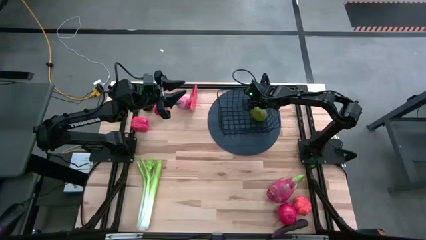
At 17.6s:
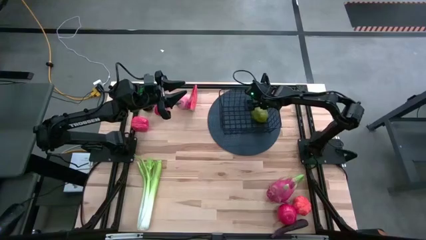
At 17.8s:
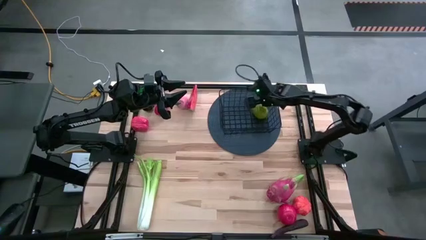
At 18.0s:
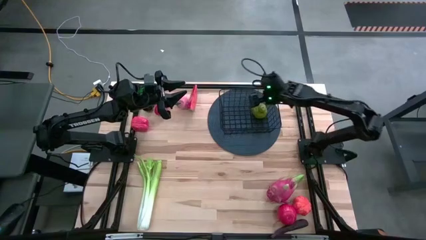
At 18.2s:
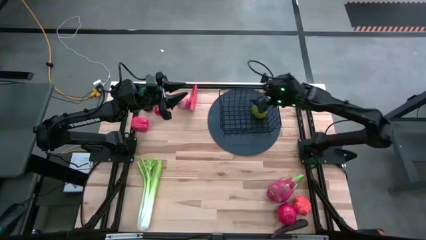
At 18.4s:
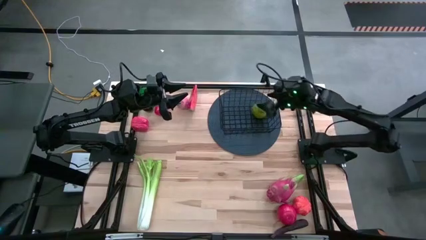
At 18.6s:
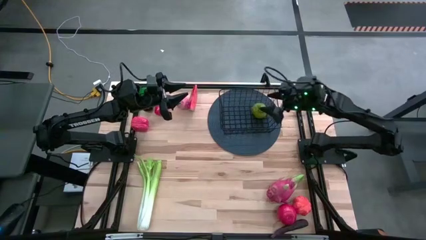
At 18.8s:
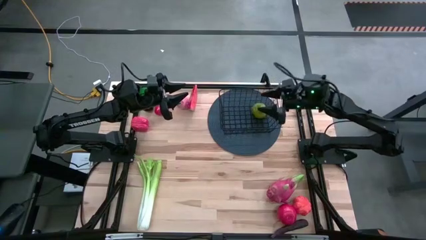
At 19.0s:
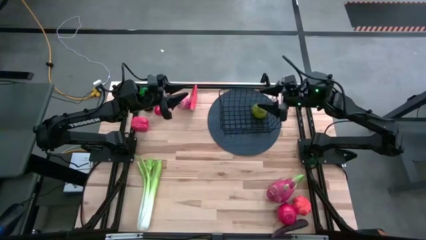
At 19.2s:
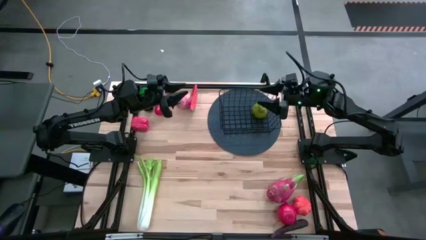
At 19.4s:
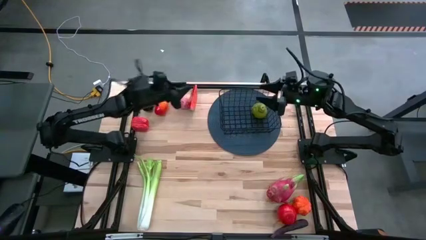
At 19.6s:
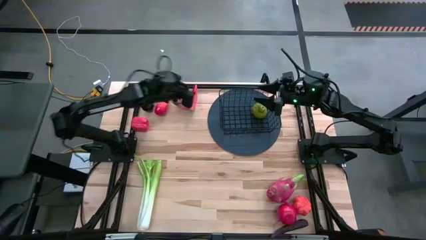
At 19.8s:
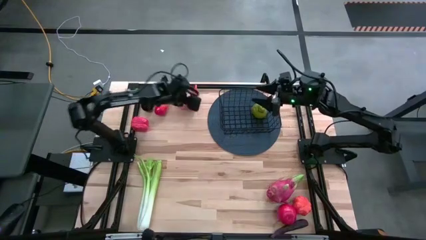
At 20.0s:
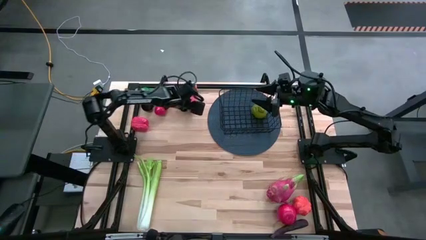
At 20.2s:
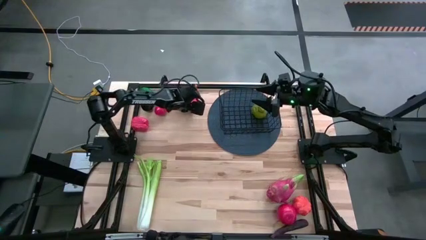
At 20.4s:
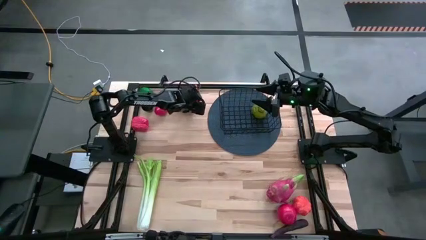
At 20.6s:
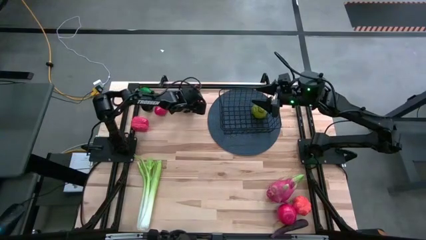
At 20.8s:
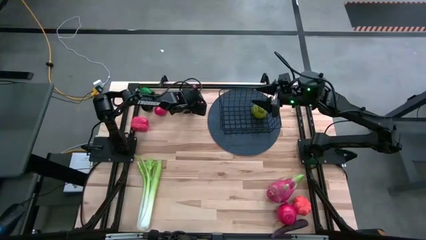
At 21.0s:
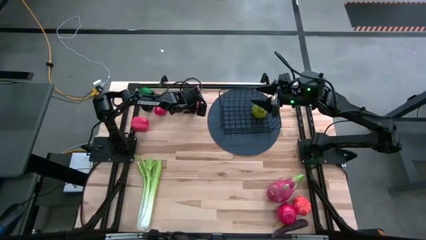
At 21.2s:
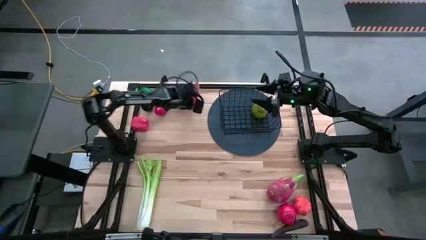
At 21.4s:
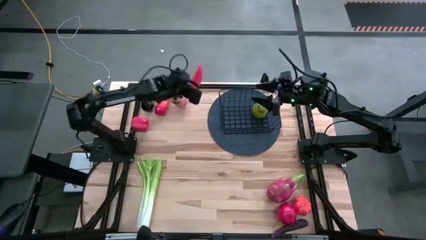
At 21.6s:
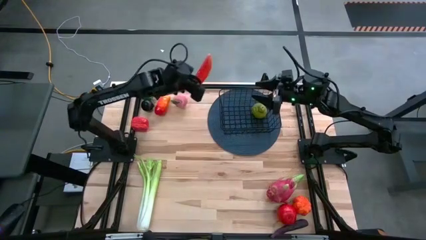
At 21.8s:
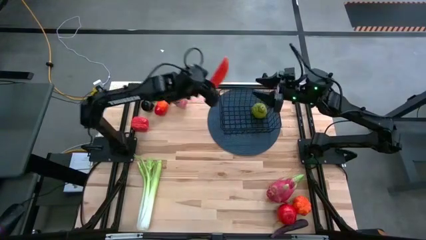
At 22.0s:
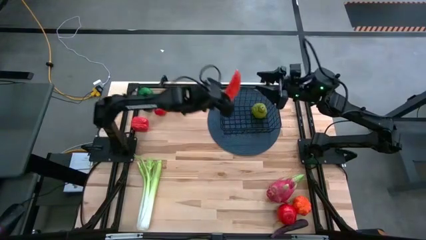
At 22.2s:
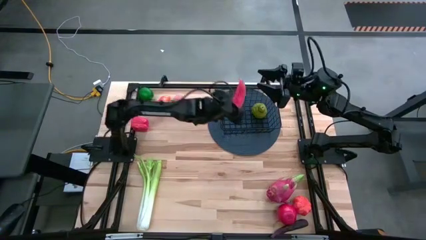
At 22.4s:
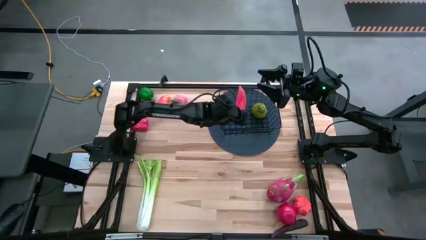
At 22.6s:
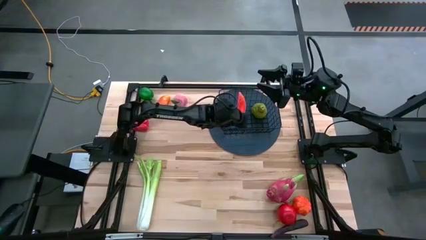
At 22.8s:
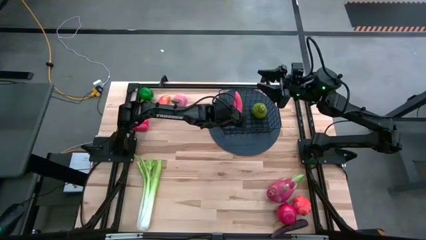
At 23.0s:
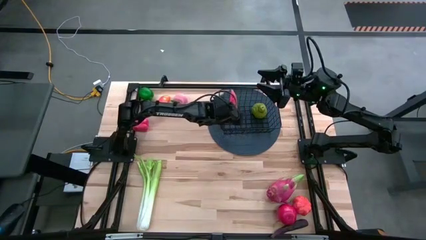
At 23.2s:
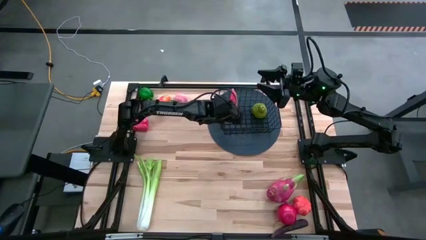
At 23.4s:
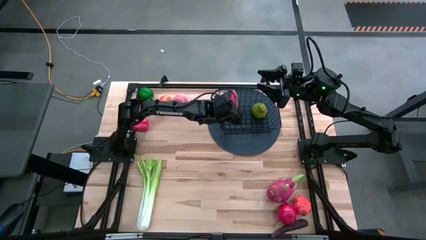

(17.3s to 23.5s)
Task: Build produce basket
Put the watermelon into the black wire basket

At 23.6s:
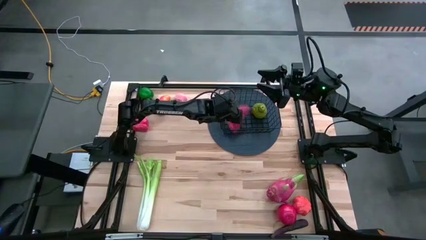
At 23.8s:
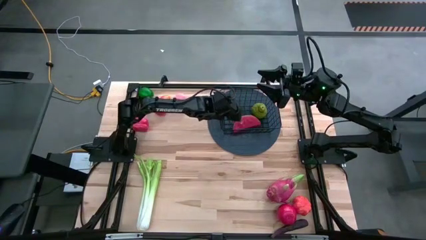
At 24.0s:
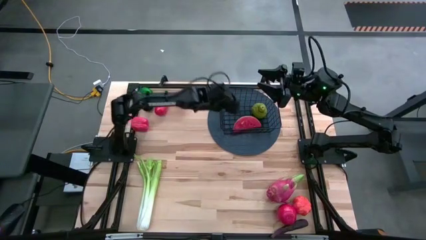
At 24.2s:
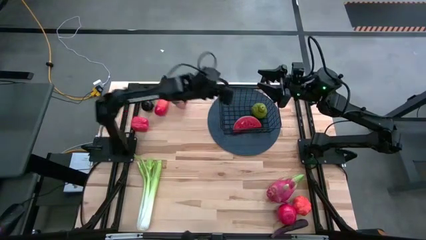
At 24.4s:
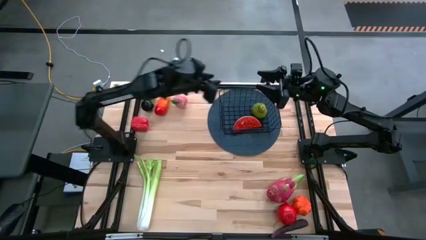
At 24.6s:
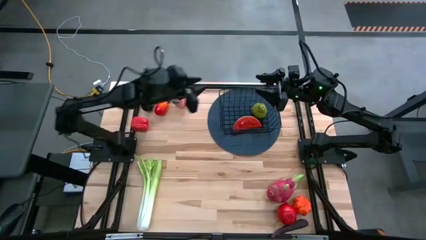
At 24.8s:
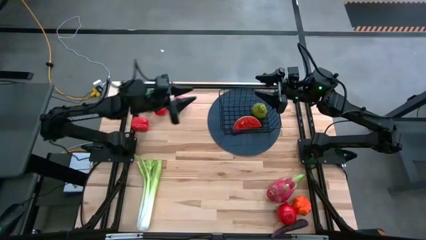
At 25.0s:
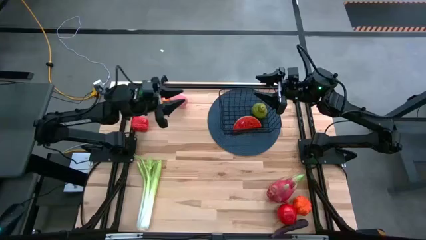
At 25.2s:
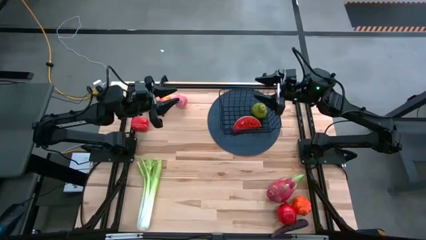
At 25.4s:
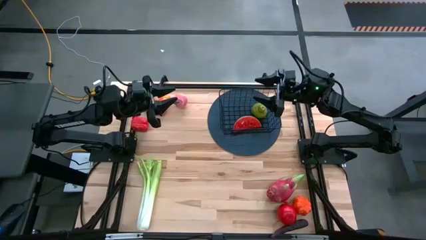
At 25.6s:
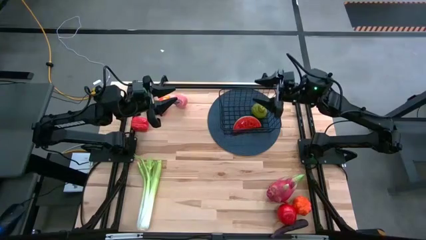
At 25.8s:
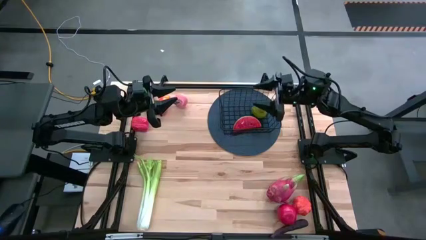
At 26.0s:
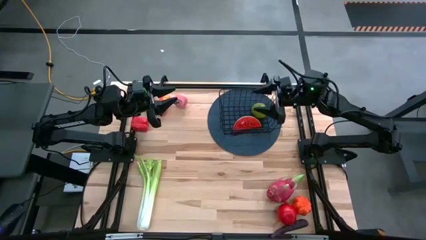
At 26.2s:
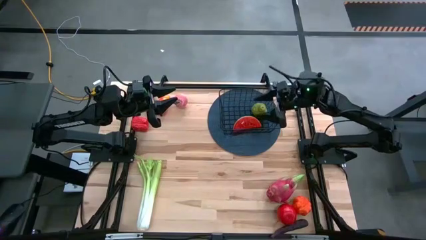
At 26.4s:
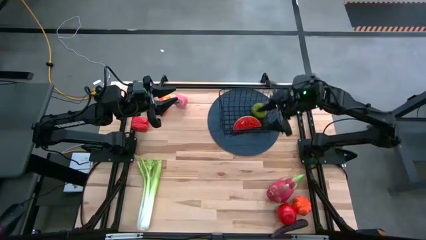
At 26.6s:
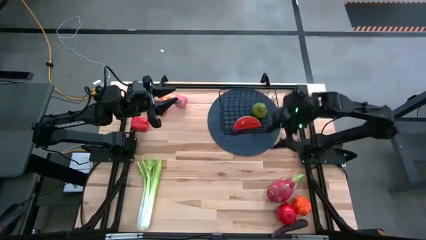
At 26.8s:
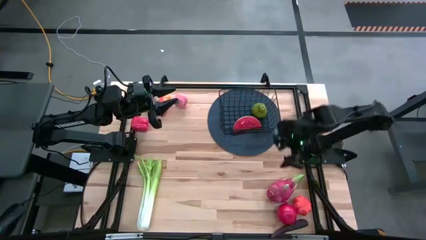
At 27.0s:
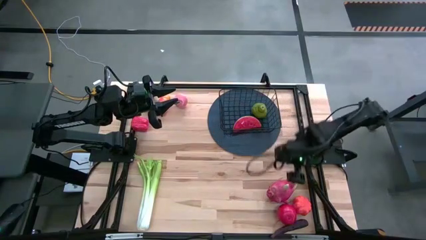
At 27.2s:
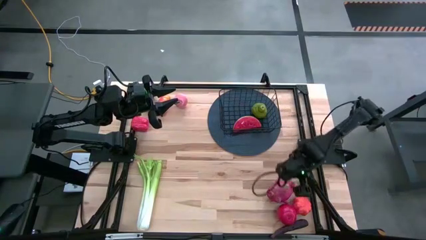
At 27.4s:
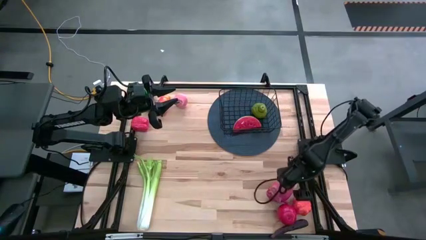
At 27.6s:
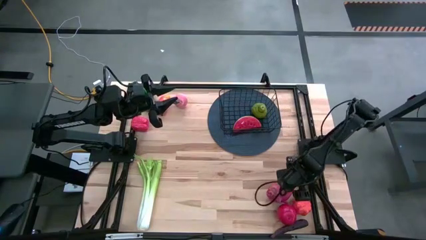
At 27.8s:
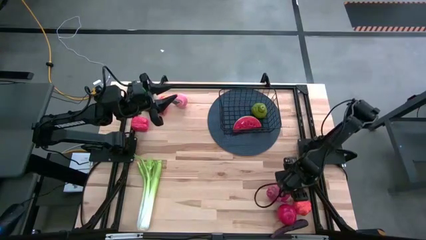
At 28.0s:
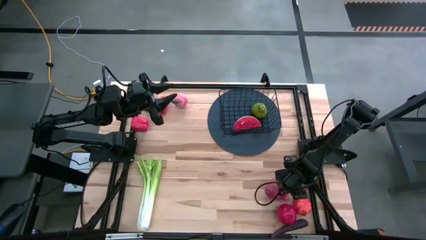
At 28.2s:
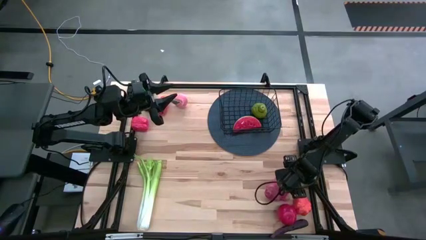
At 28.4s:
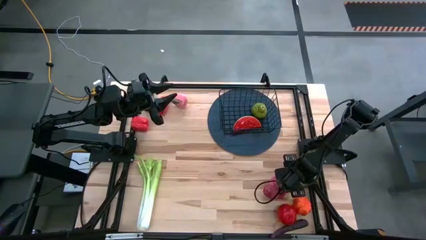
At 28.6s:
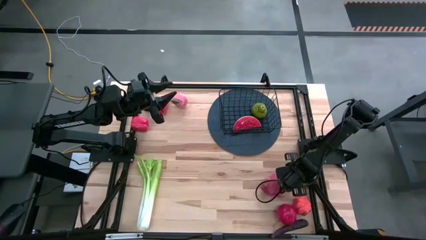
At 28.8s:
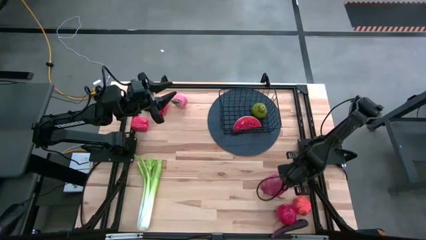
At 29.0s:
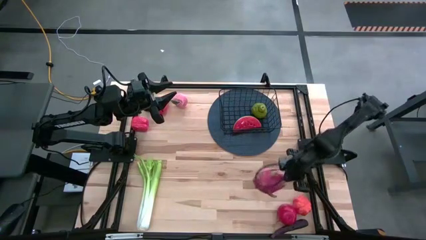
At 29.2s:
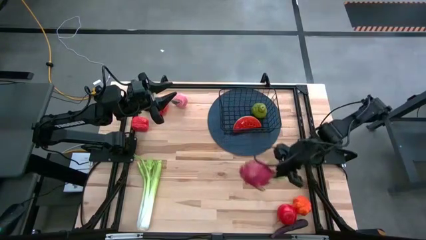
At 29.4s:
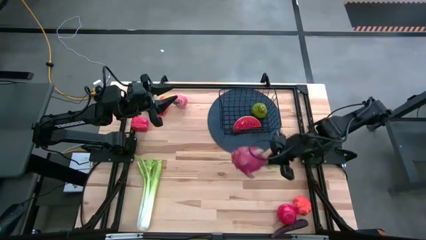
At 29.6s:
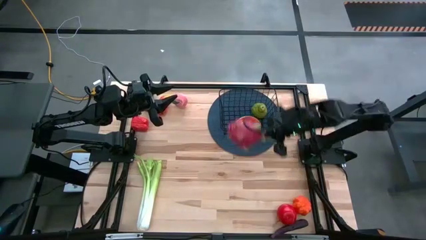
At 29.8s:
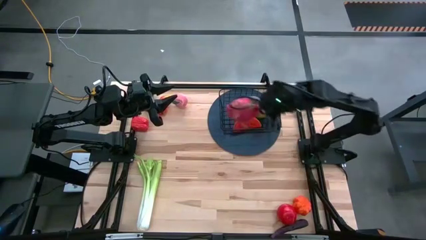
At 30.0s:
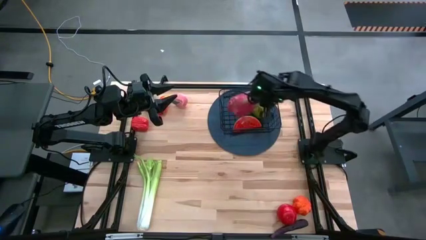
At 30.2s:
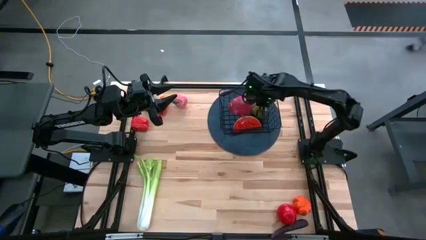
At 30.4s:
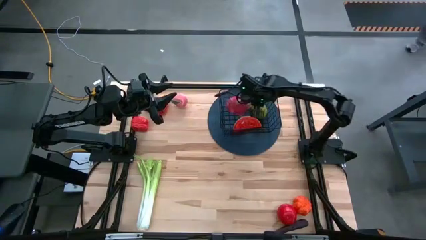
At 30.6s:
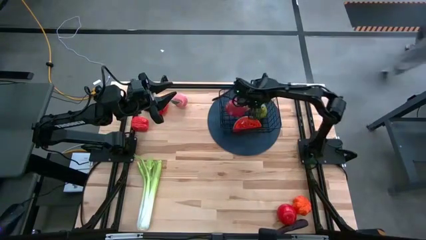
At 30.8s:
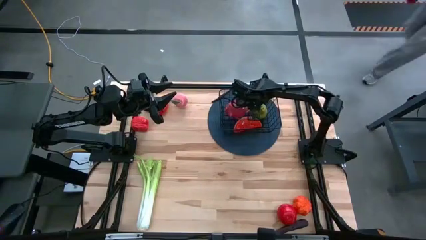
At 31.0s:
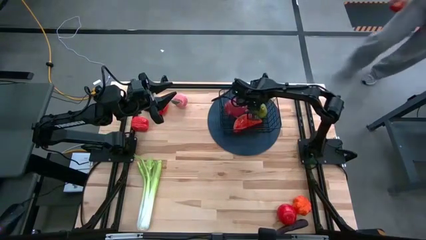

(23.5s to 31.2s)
Put the dragon fruit into the black wire basket
